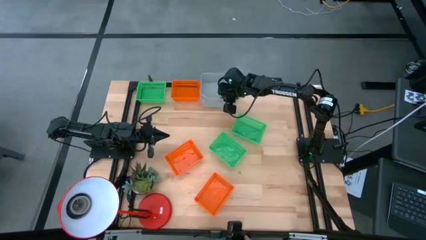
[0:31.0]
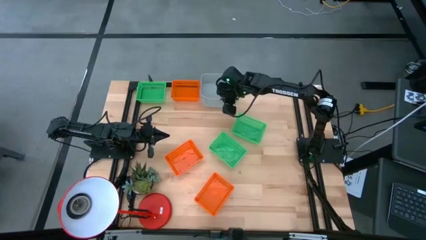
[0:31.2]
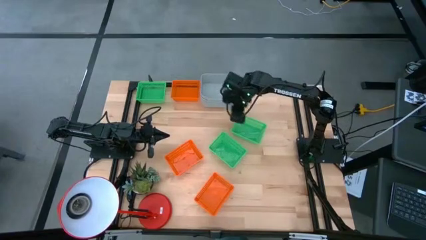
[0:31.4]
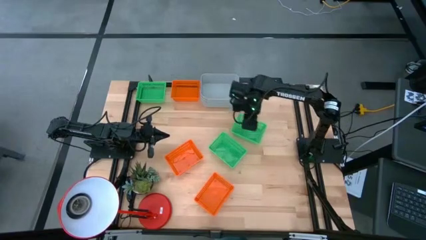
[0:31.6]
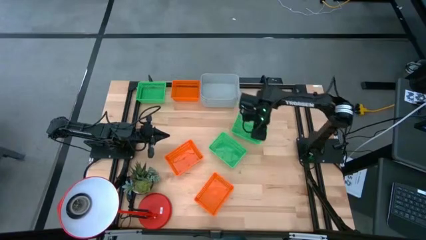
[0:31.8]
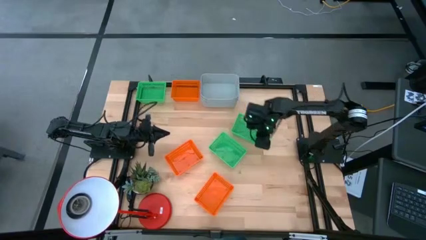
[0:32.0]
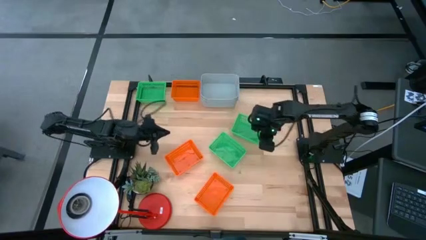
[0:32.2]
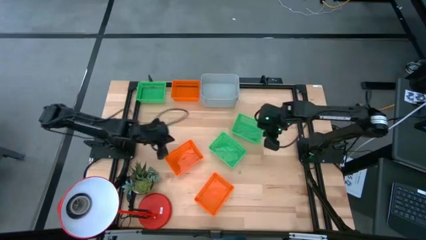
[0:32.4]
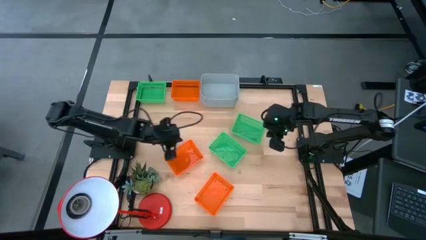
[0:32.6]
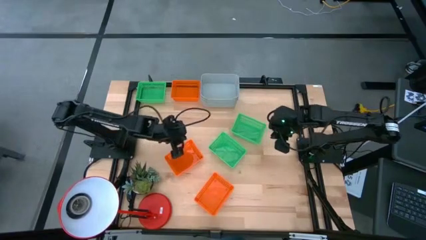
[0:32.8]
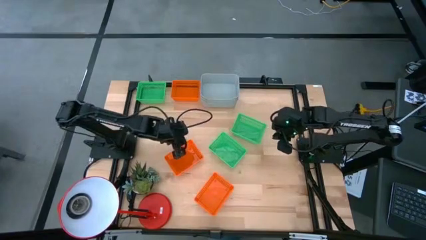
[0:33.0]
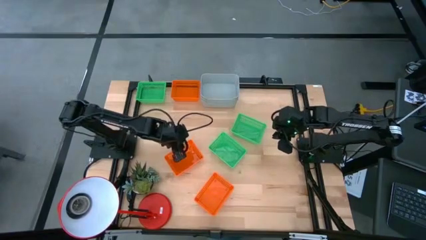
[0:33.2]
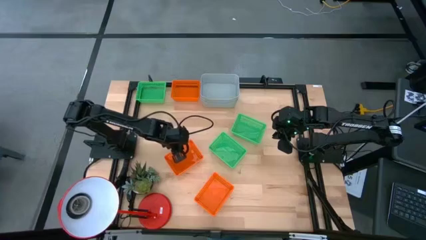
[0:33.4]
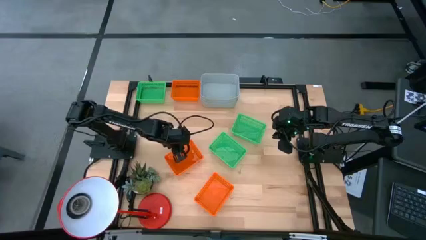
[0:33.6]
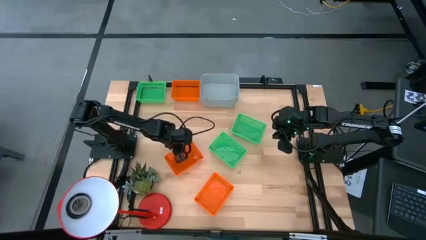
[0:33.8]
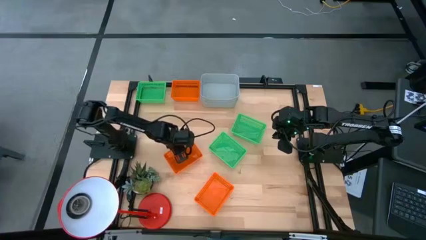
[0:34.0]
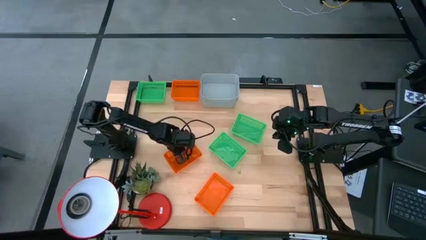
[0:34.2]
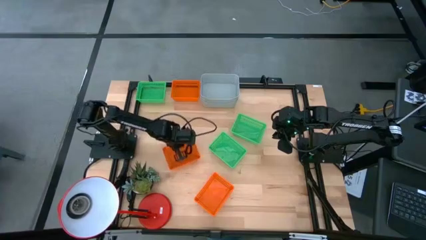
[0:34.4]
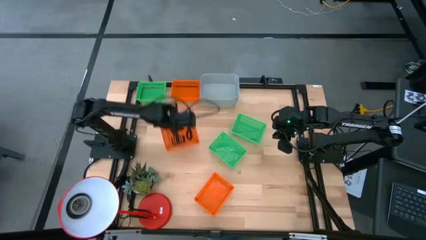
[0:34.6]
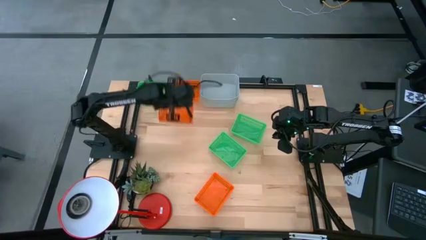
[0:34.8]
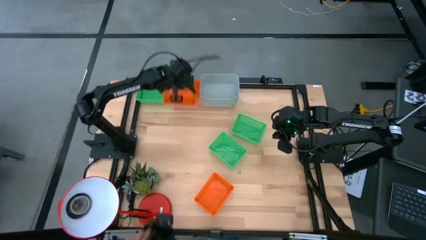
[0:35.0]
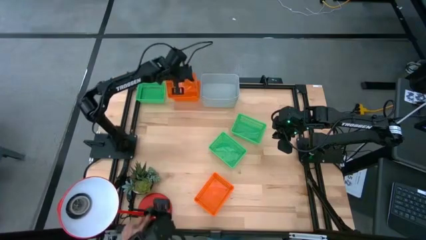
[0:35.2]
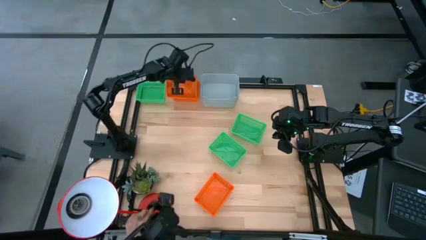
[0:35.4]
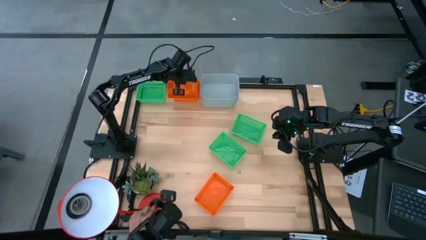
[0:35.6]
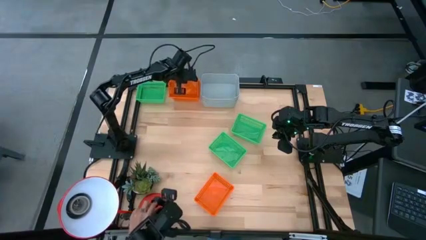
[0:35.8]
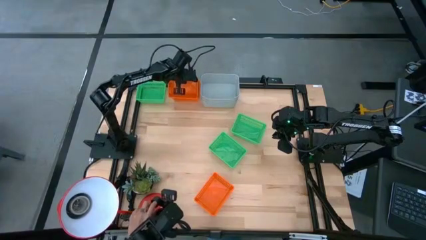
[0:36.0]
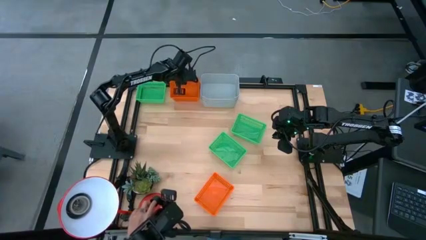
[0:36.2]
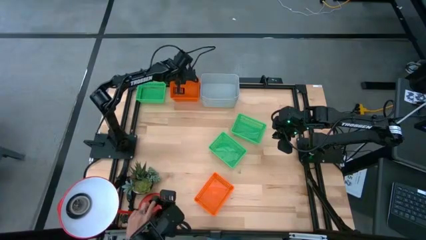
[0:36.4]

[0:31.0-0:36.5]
Stack the middle orange bin on the top orange bin

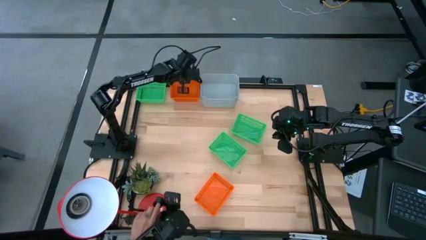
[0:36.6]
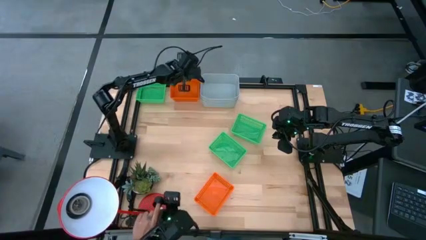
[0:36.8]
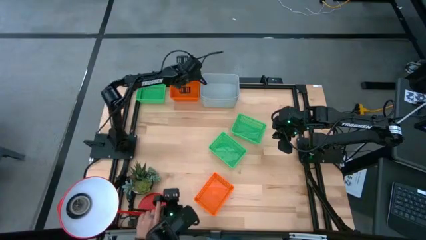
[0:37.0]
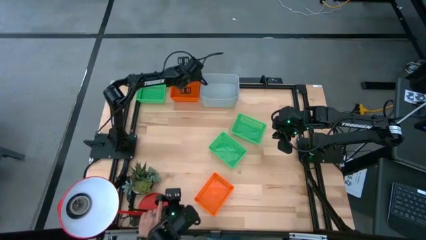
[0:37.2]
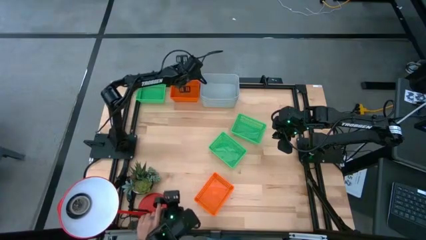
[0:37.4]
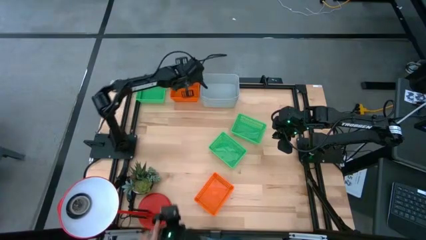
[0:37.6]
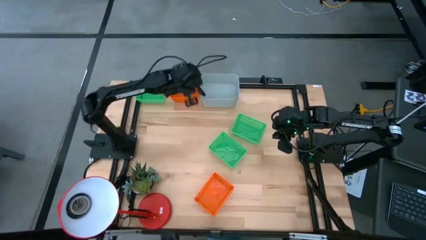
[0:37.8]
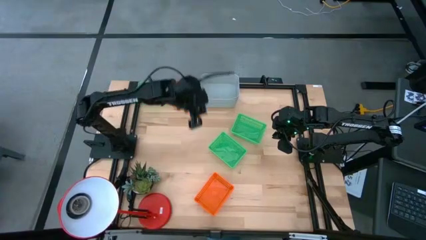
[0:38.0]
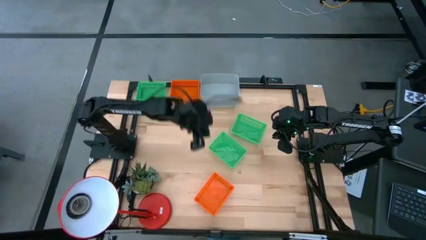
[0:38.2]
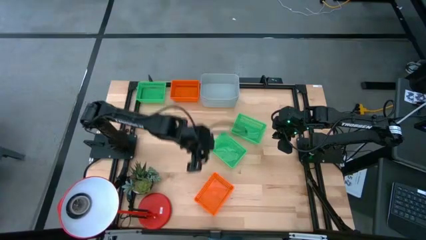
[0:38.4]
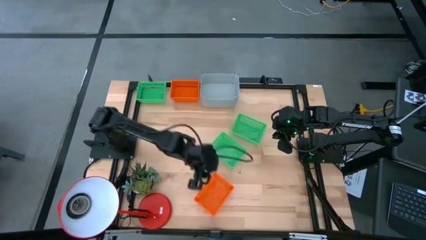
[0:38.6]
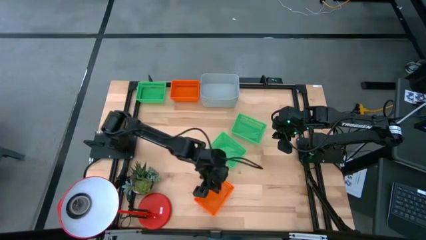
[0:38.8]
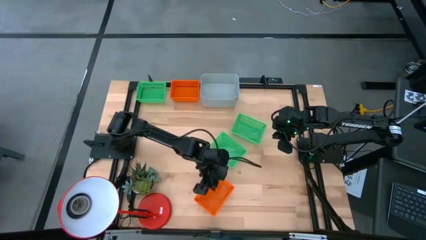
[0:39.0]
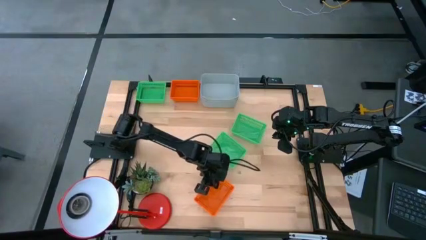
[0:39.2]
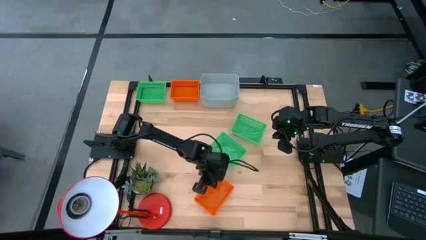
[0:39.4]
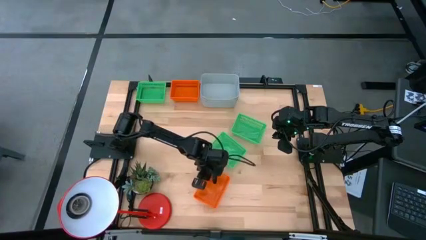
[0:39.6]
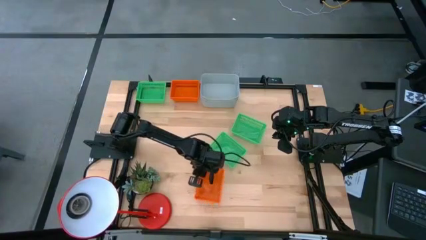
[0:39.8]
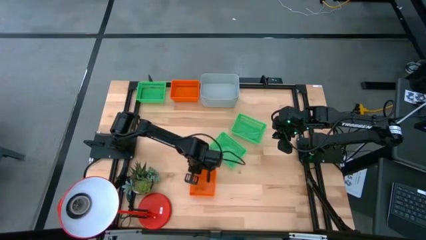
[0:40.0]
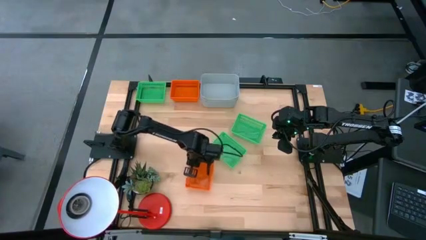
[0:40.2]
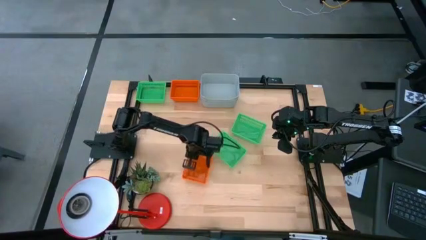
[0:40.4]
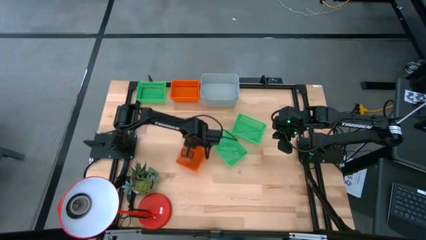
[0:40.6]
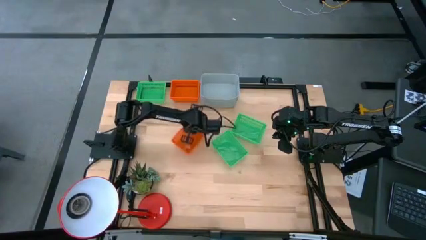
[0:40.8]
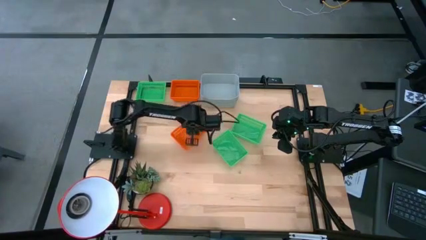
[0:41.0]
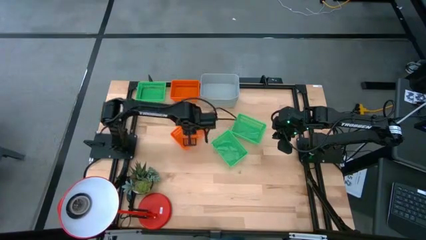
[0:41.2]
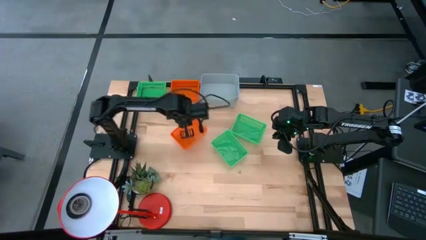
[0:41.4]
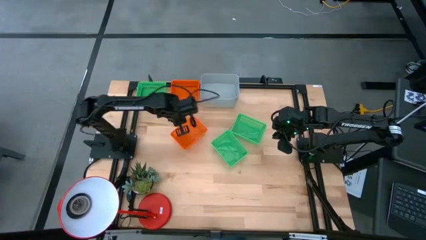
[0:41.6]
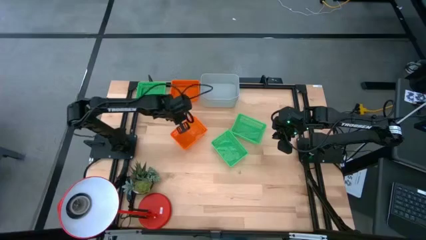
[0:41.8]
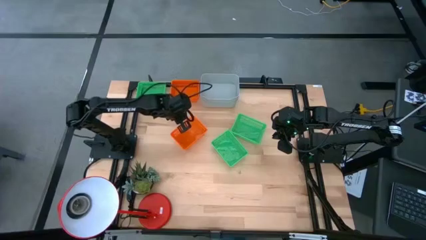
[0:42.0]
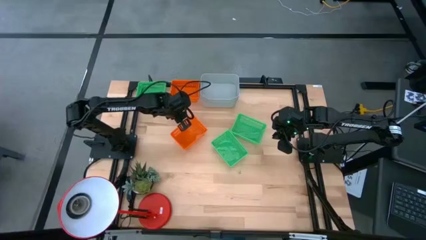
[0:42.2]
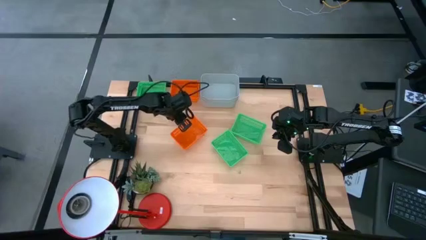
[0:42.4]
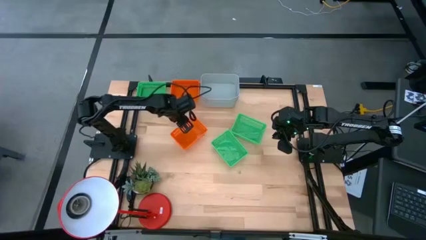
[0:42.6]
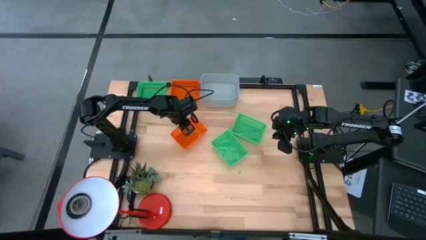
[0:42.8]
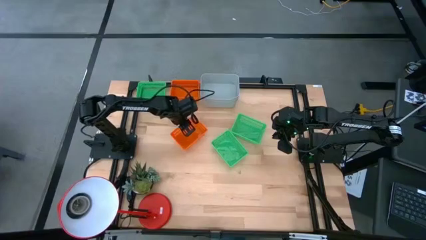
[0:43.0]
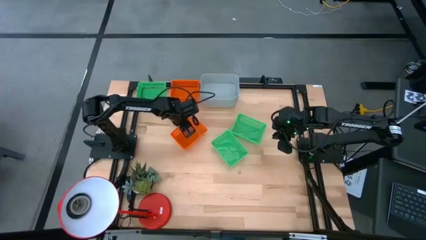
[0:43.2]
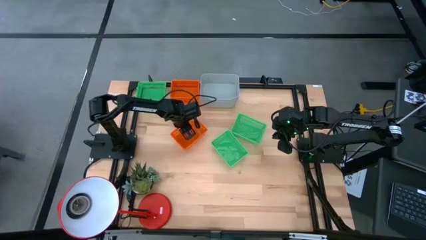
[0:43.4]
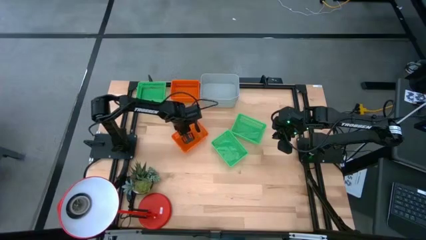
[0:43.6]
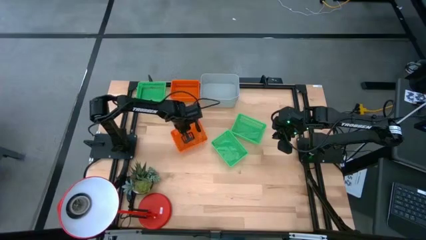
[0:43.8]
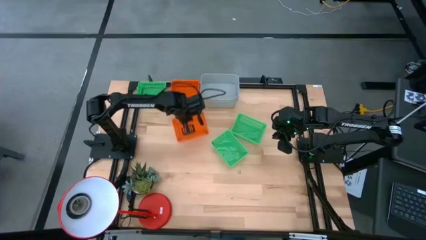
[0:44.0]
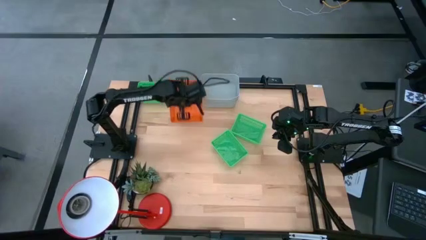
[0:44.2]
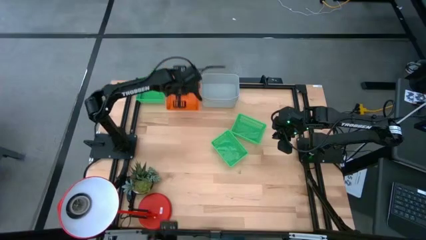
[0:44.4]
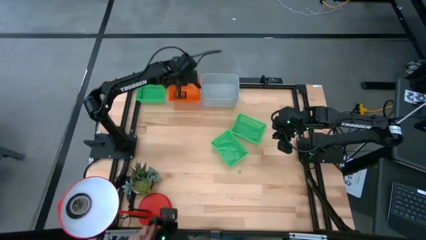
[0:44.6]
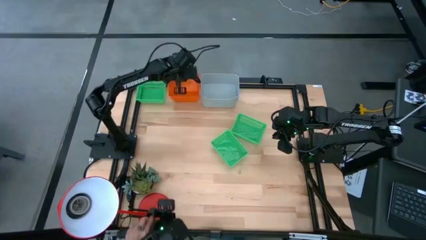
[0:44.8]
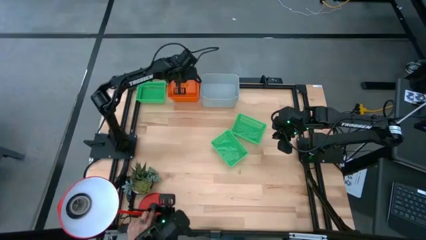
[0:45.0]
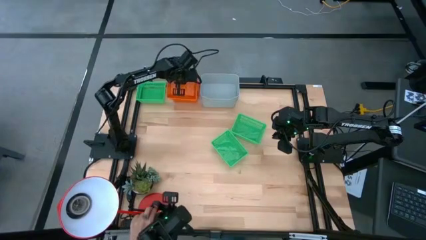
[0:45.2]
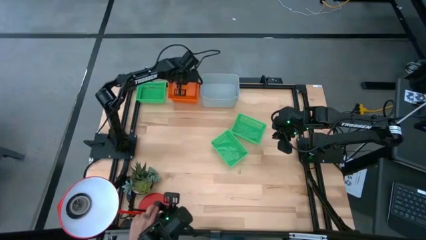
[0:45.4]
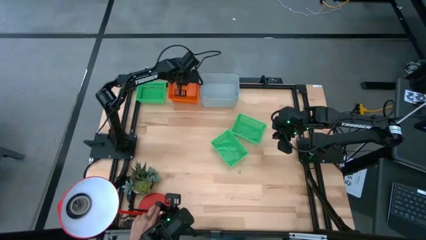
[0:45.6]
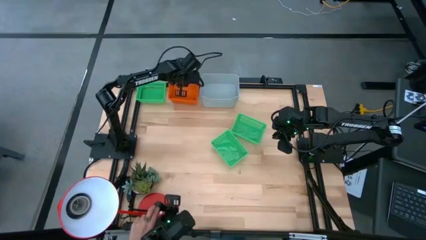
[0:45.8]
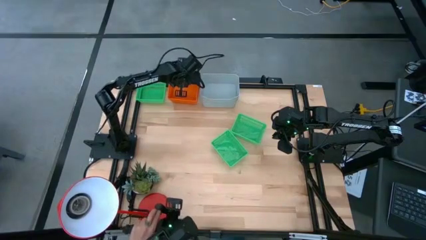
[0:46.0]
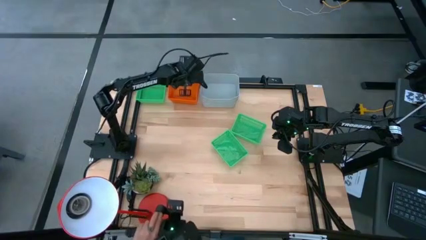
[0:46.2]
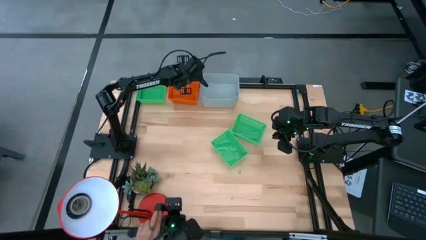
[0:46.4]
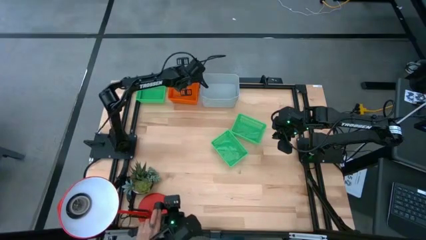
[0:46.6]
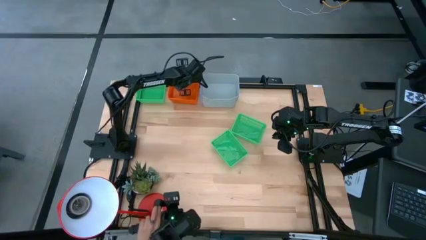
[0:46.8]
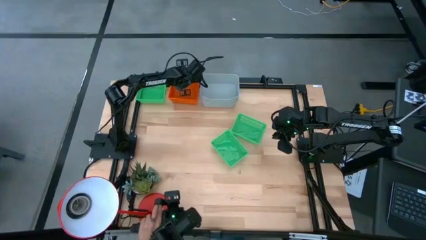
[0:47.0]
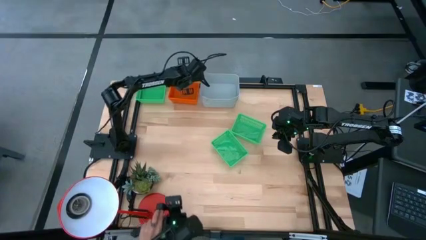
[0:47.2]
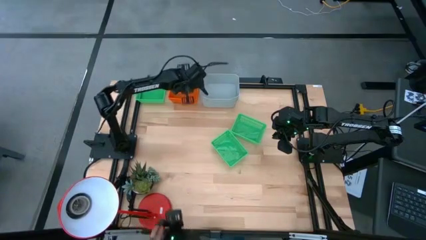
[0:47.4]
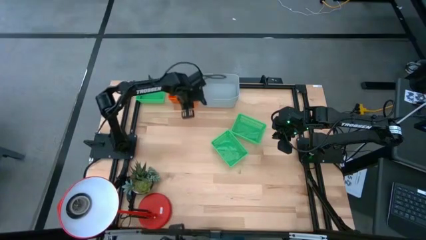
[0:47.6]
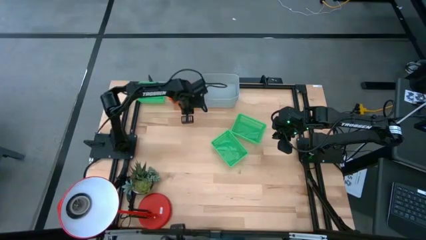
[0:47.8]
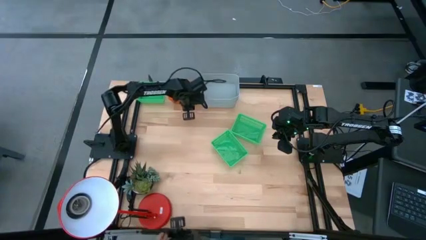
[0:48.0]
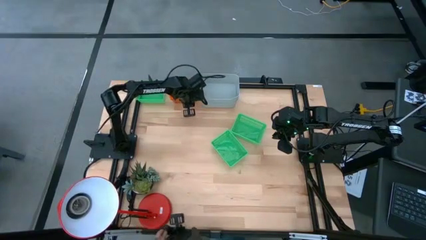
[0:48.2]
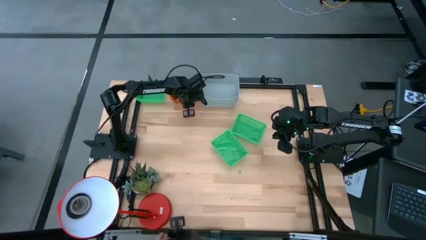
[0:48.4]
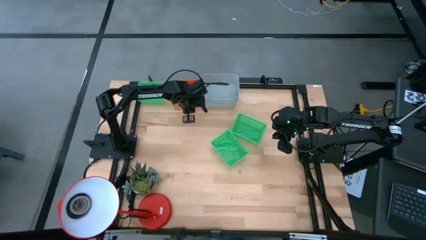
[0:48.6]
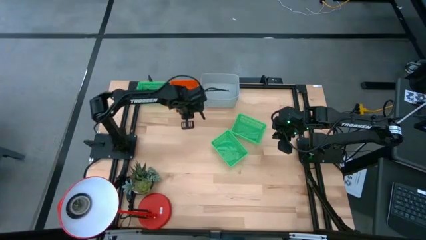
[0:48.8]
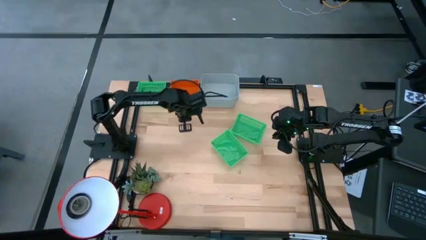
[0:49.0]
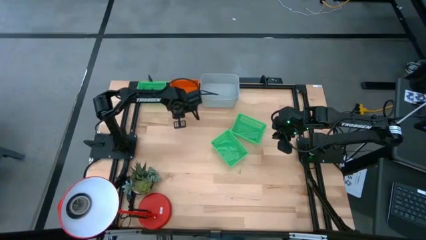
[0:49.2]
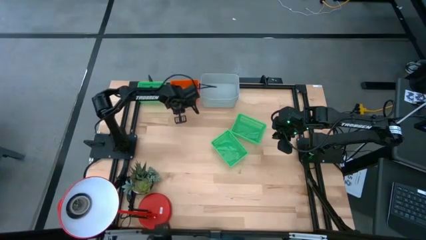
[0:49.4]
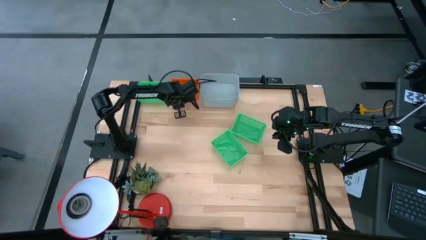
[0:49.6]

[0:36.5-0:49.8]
Stack the bottom orange bin on the top orange bins
